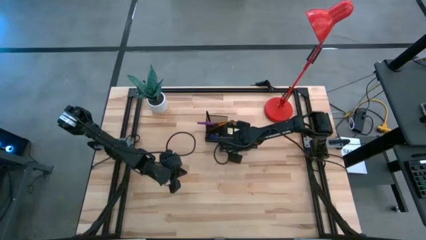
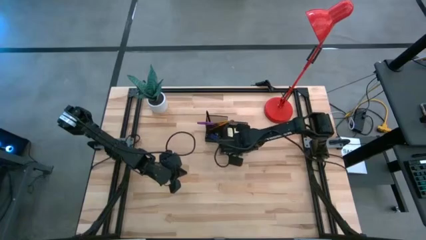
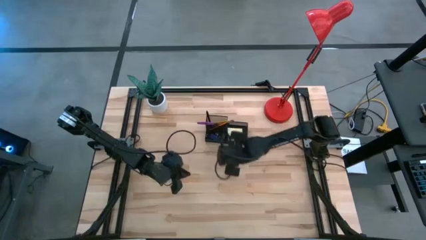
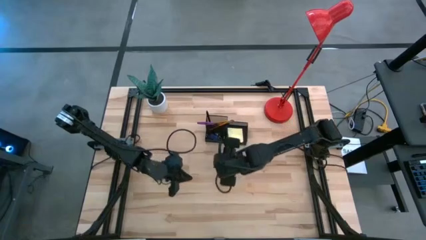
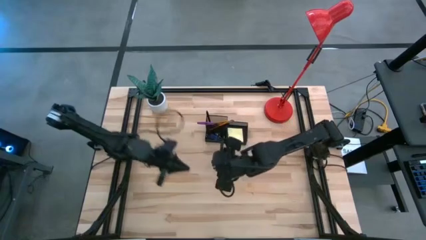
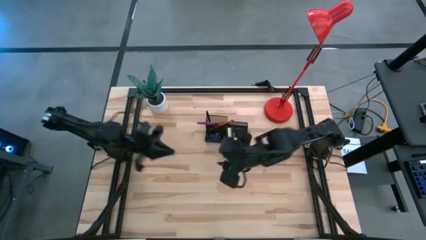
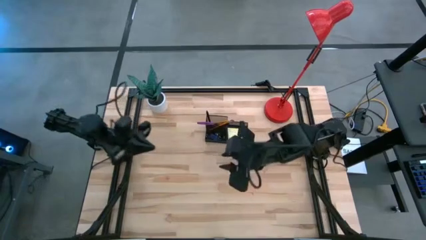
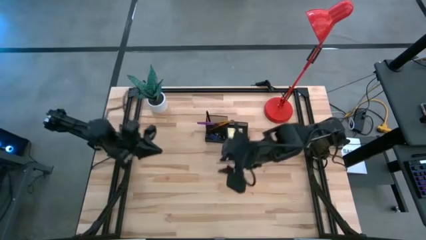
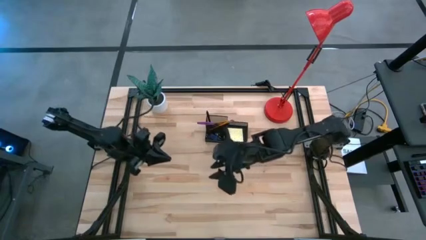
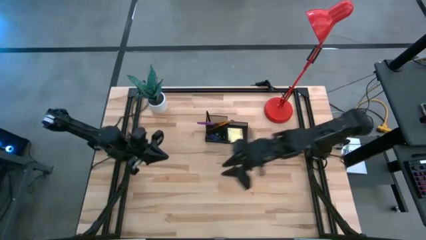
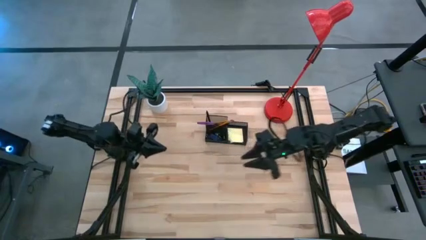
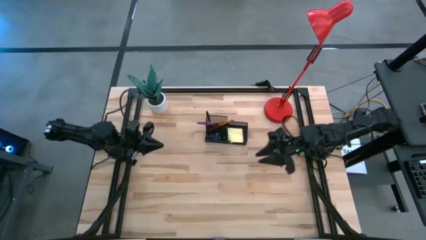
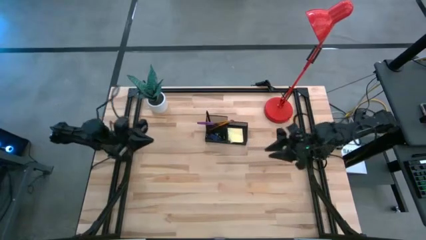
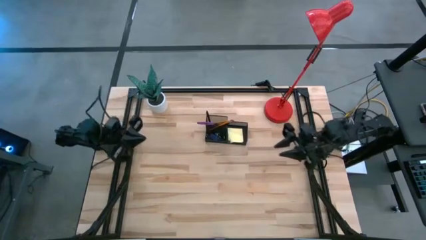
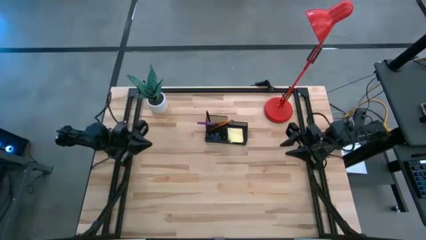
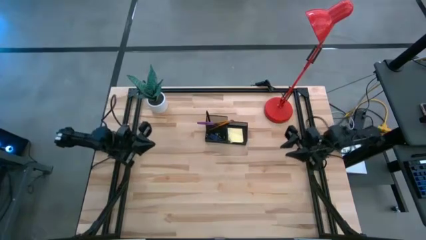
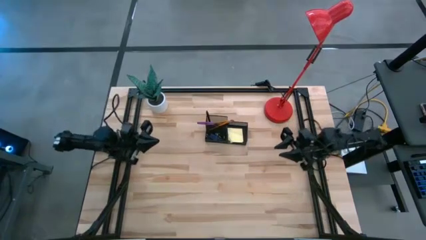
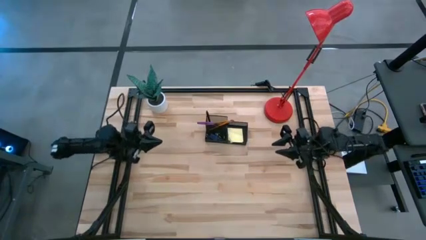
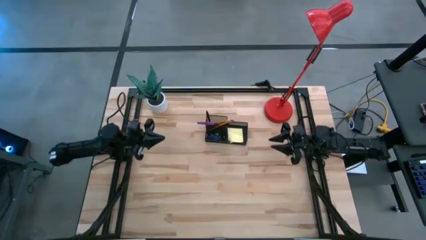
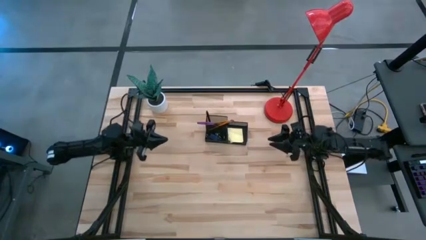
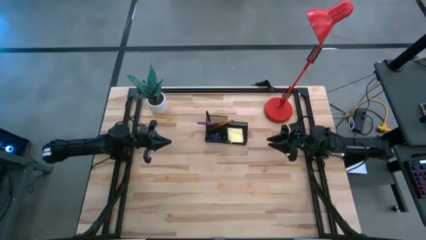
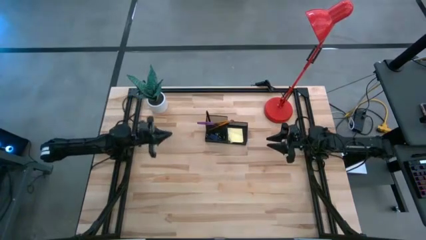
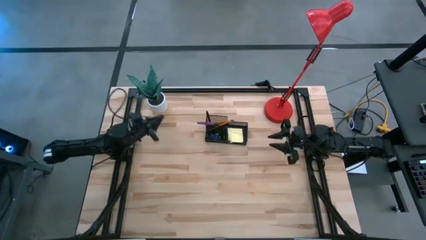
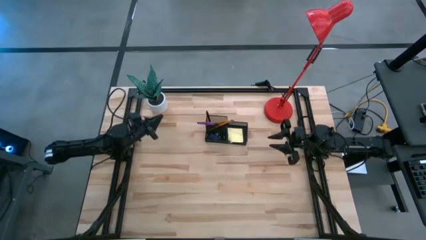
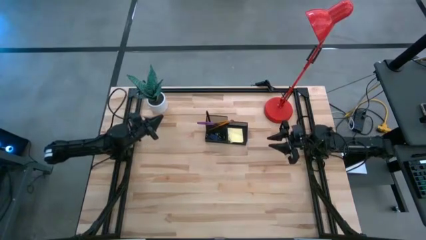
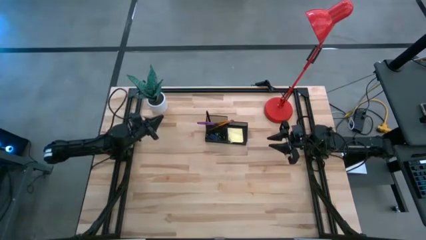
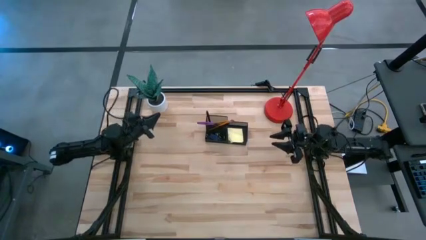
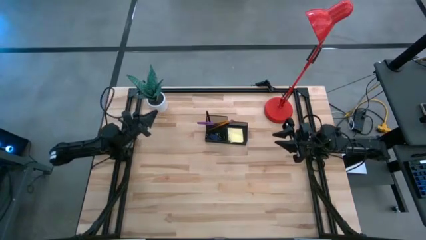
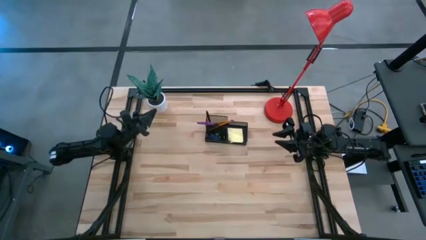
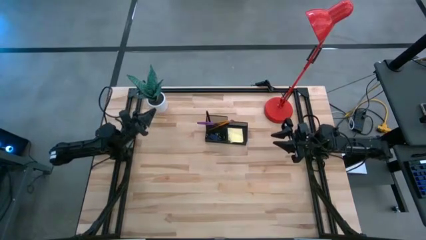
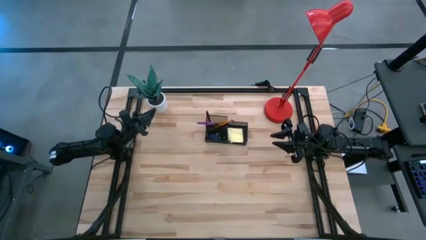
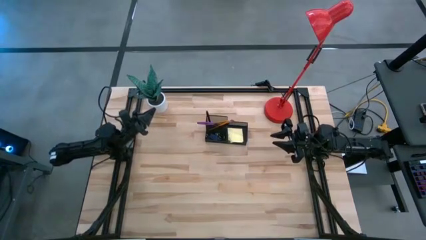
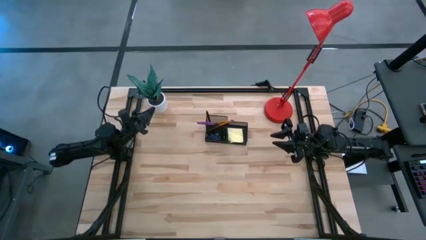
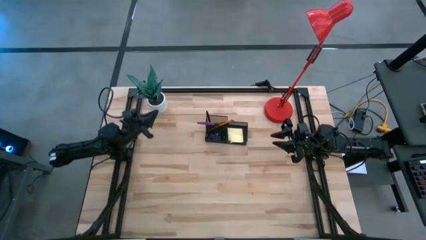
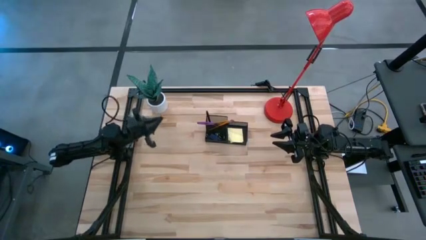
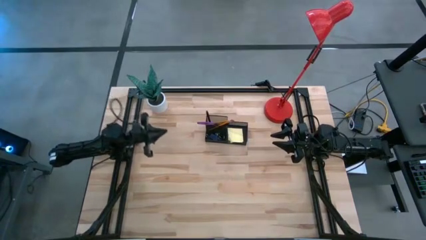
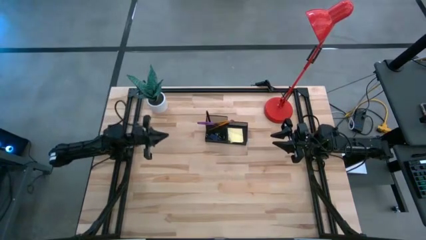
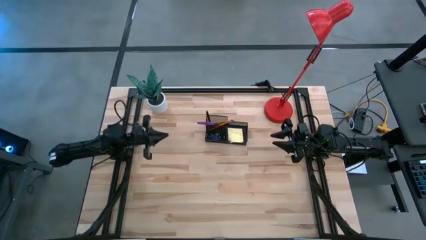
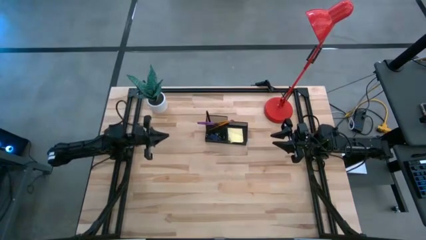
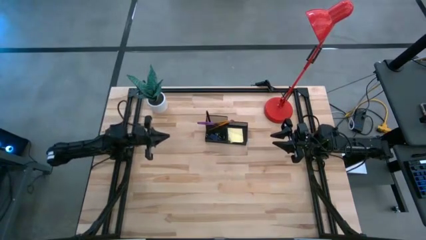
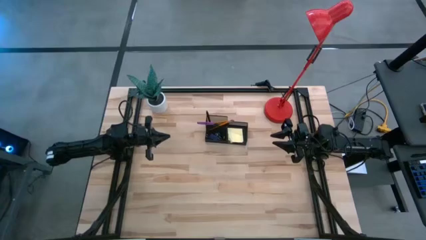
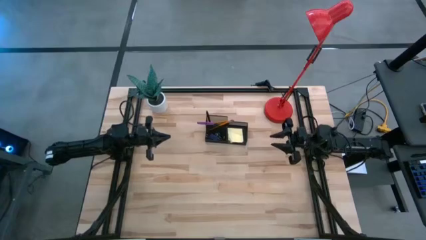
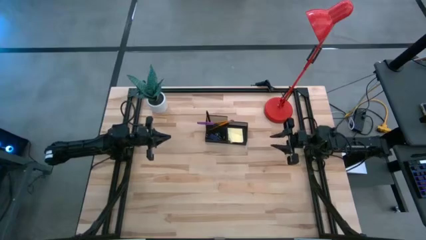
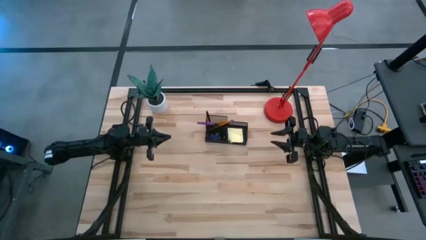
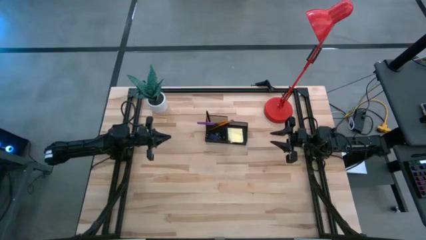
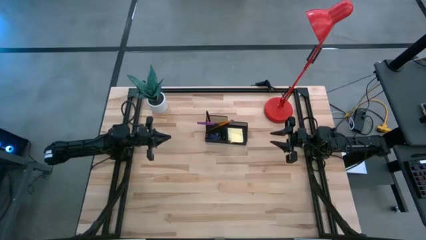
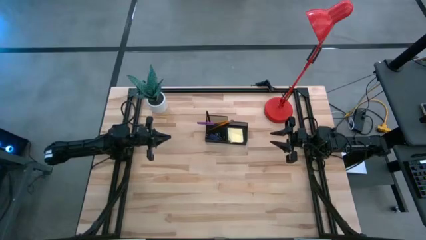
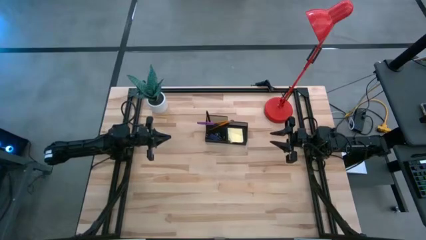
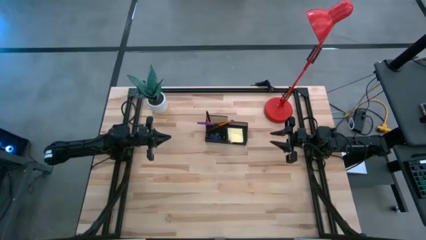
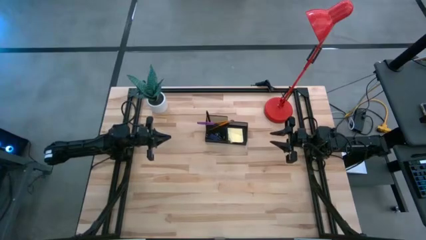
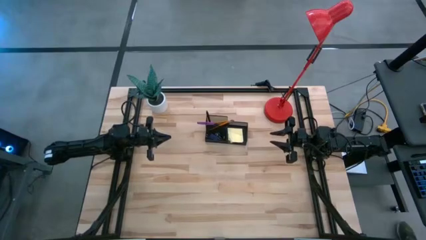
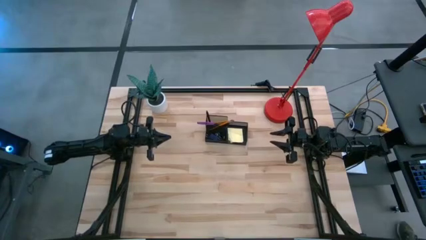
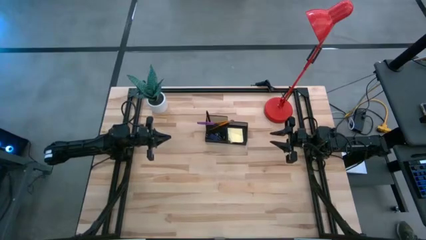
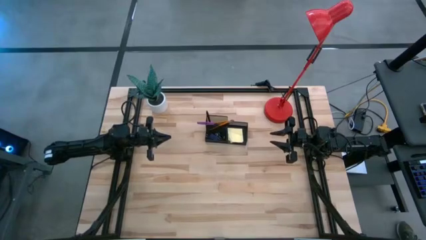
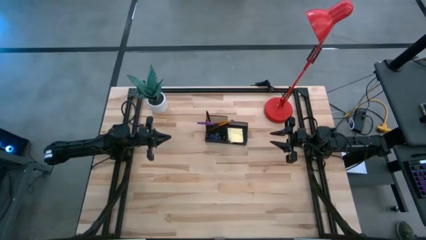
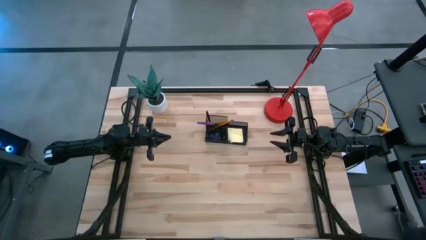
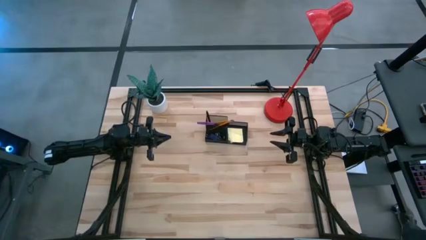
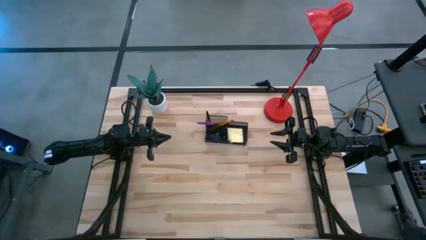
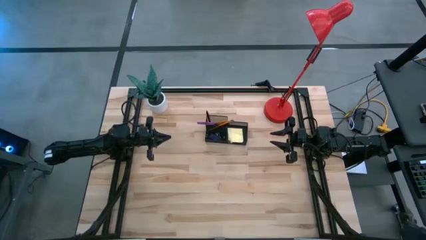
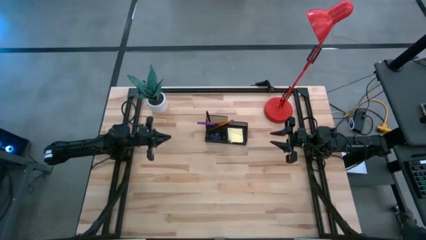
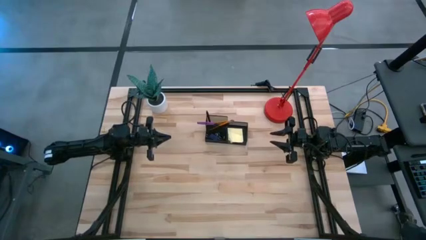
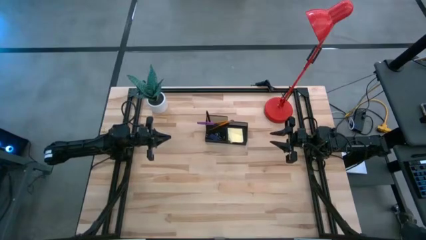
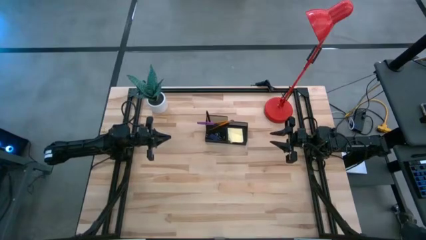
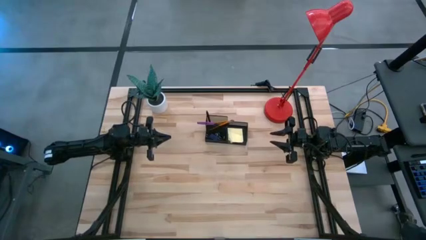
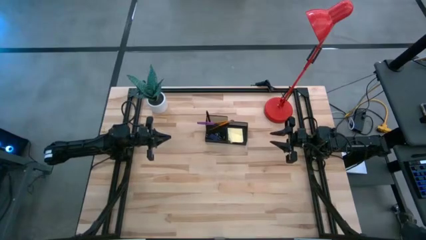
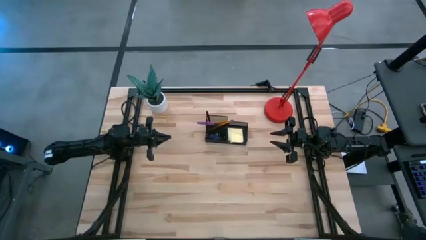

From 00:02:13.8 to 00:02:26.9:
Task: Pick and place office supplies into organizer
Return to Home Position

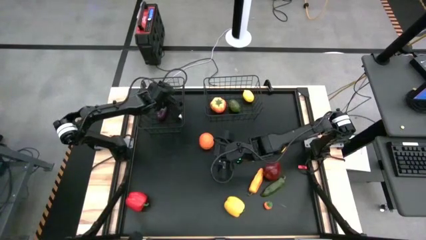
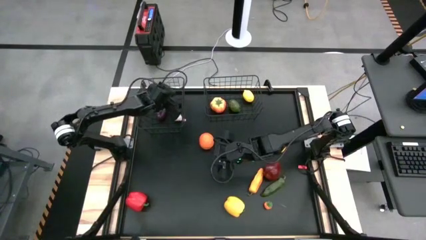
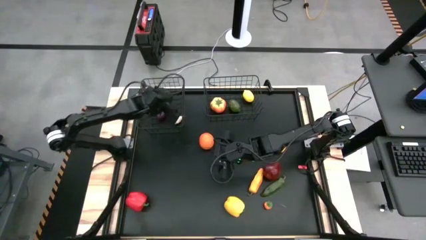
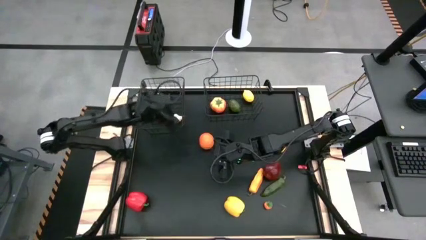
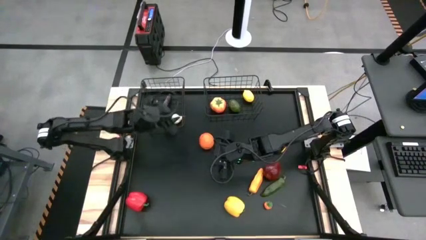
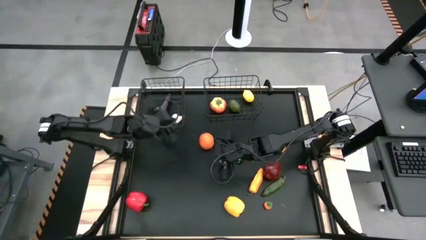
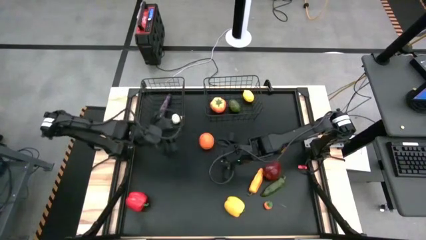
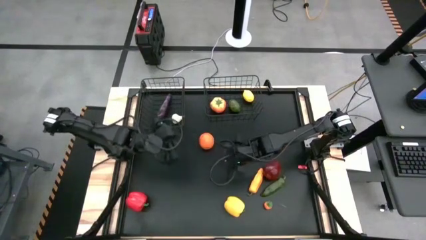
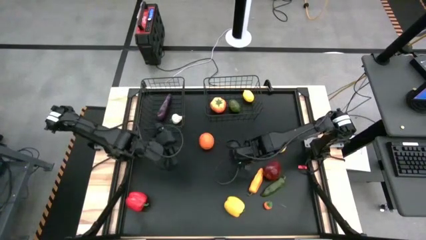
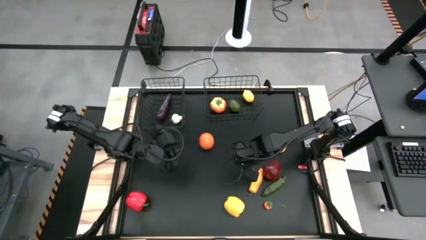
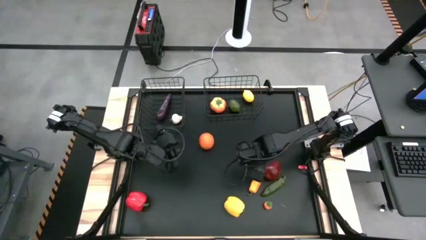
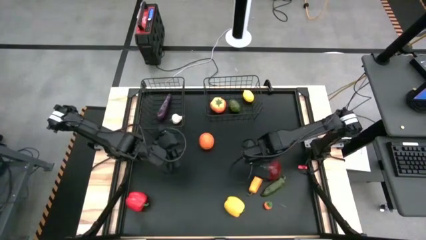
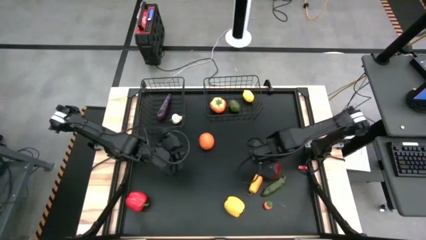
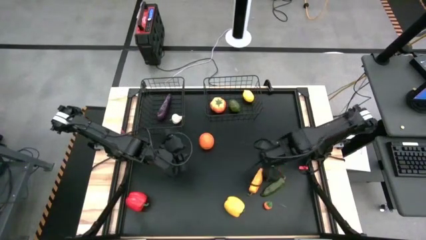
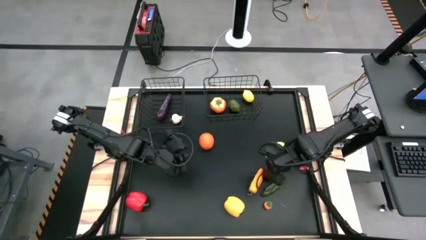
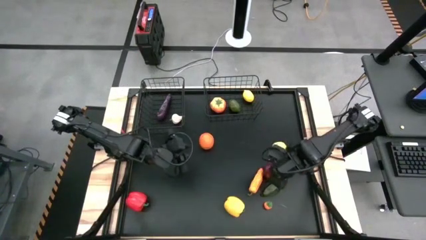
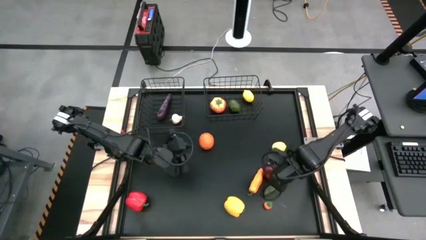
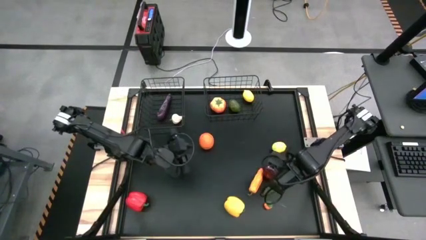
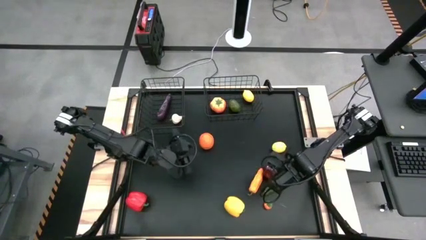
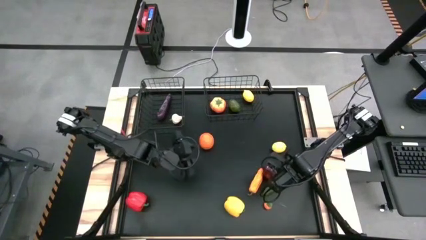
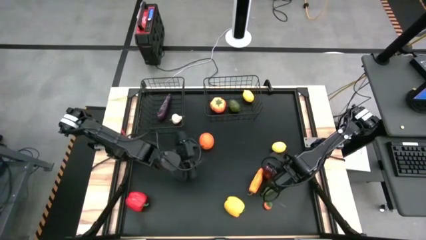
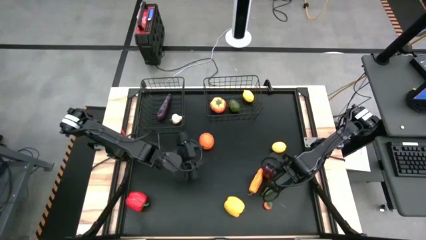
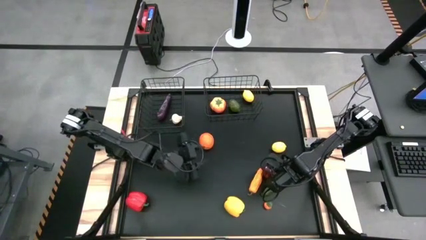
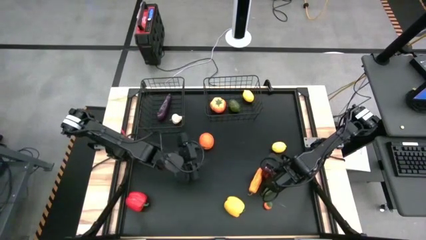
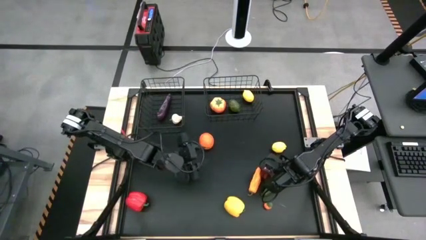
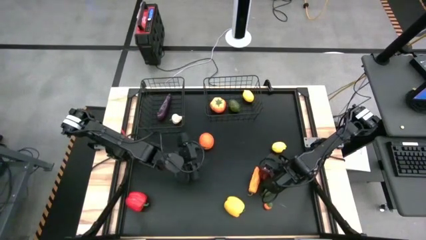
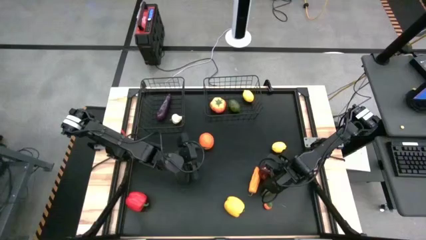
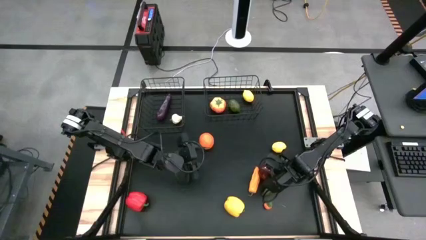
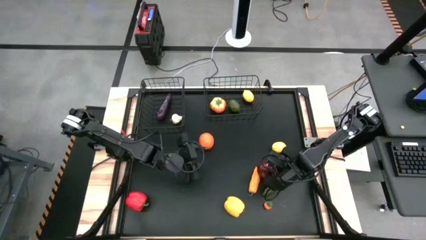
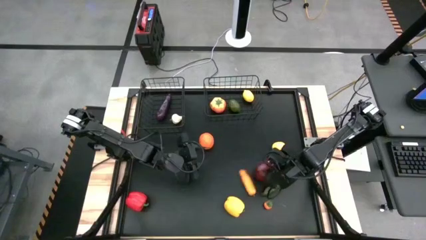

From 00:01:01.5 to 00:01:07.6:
Task: Sort produce into baskets
Put the red apple into the right black wire basket
